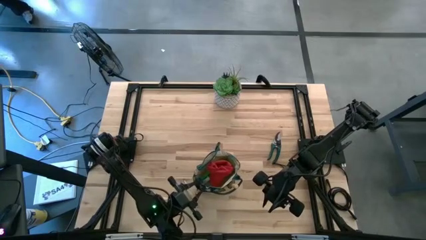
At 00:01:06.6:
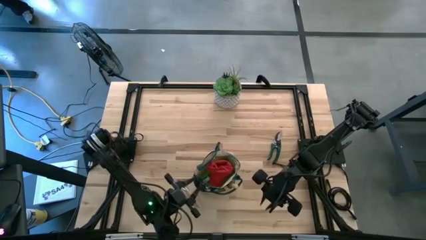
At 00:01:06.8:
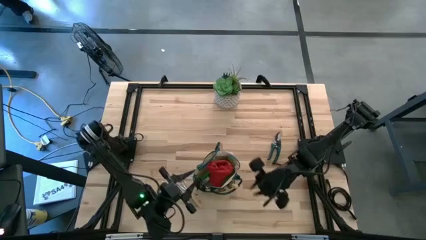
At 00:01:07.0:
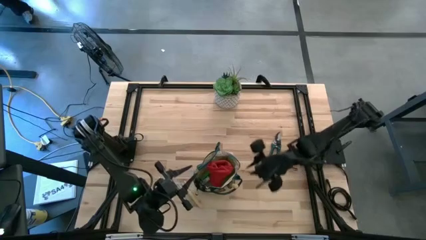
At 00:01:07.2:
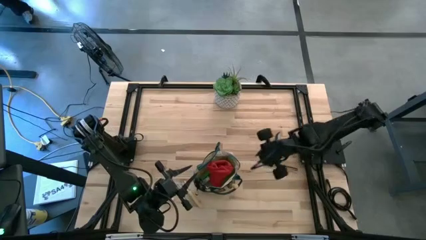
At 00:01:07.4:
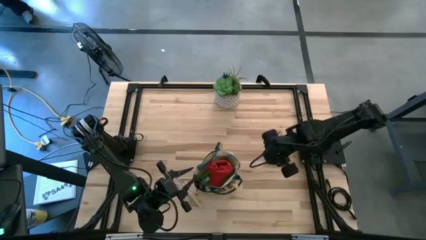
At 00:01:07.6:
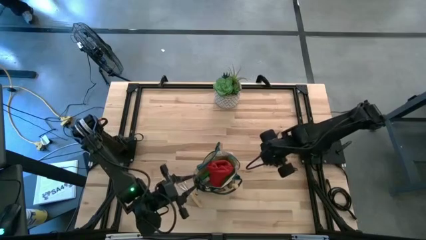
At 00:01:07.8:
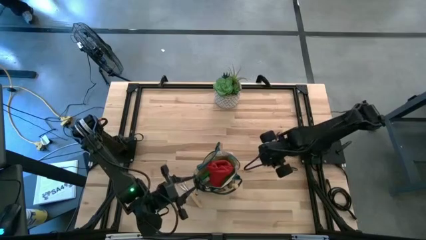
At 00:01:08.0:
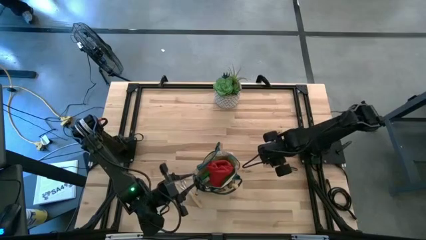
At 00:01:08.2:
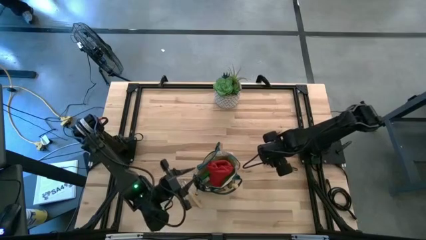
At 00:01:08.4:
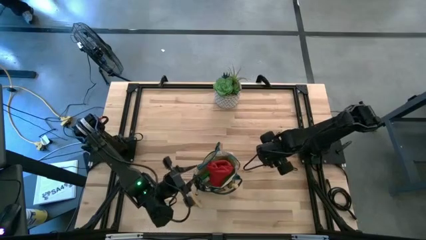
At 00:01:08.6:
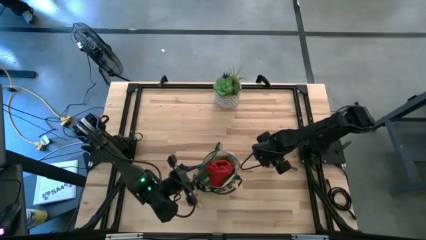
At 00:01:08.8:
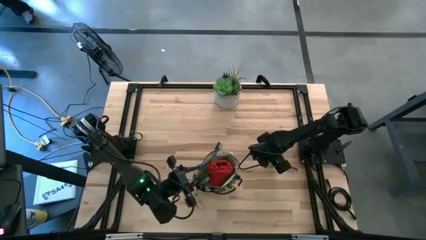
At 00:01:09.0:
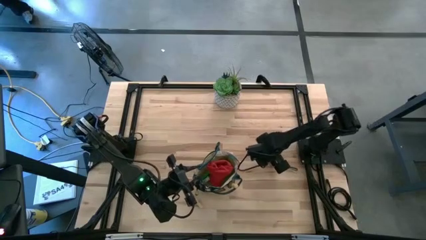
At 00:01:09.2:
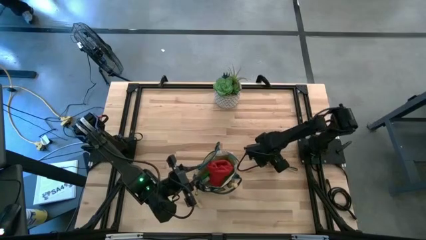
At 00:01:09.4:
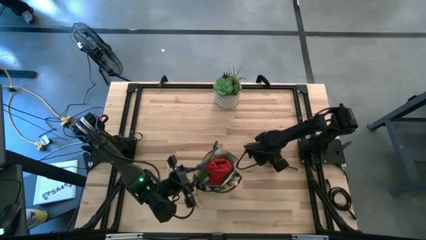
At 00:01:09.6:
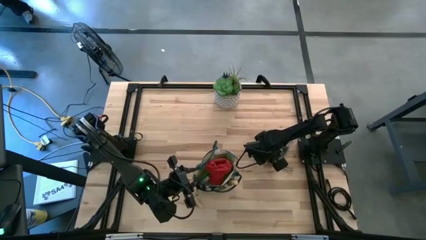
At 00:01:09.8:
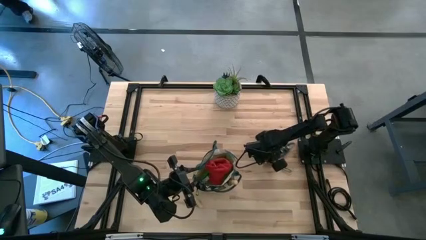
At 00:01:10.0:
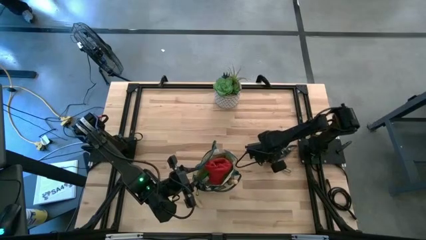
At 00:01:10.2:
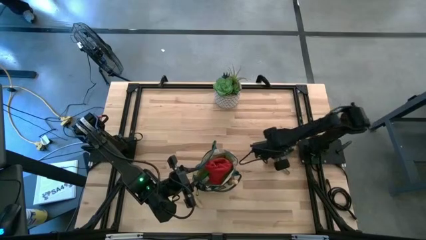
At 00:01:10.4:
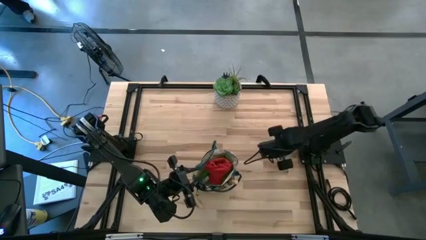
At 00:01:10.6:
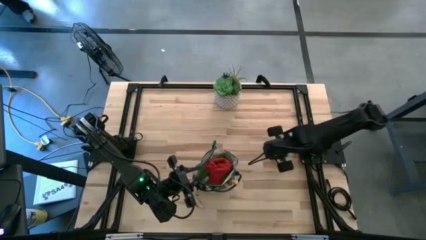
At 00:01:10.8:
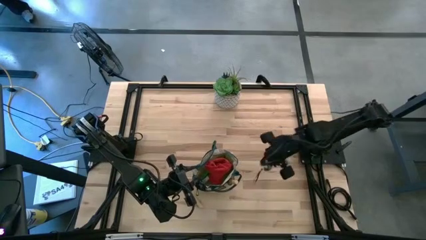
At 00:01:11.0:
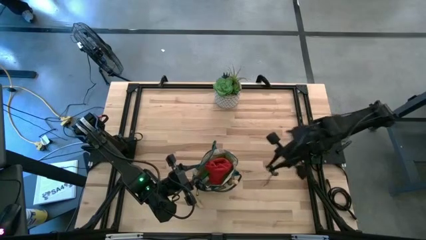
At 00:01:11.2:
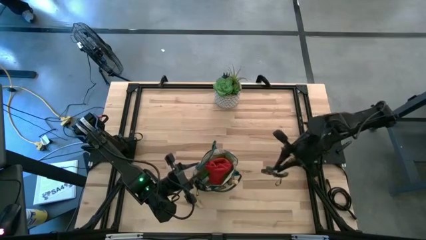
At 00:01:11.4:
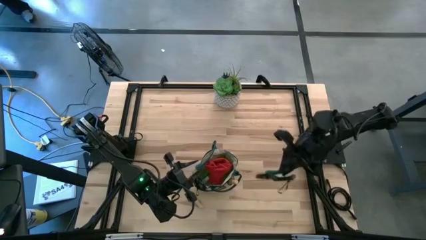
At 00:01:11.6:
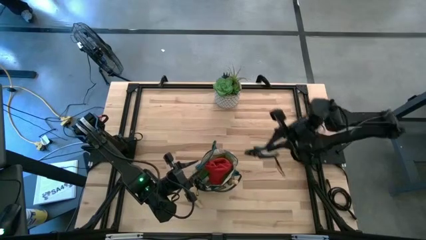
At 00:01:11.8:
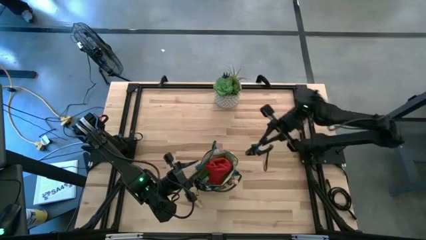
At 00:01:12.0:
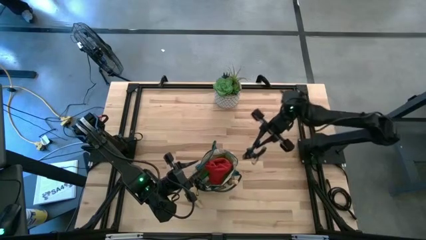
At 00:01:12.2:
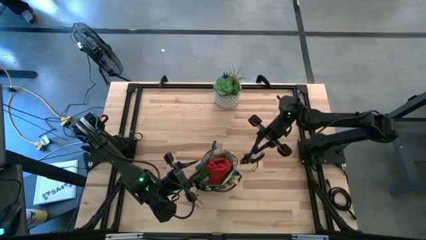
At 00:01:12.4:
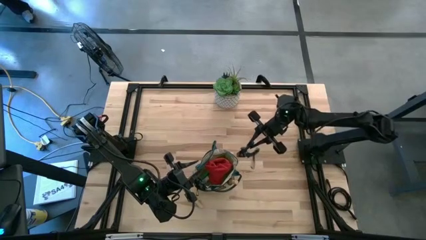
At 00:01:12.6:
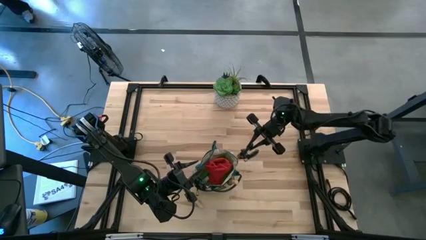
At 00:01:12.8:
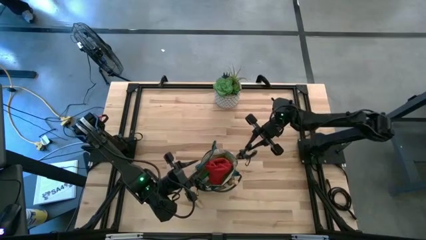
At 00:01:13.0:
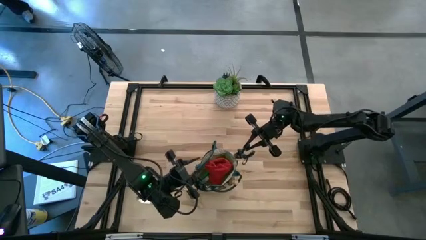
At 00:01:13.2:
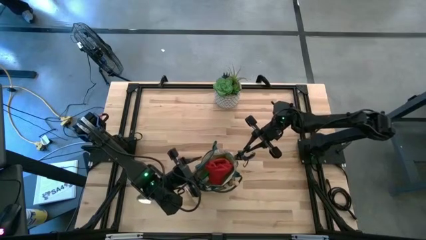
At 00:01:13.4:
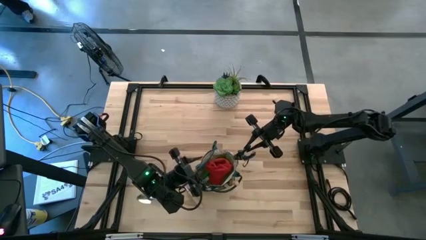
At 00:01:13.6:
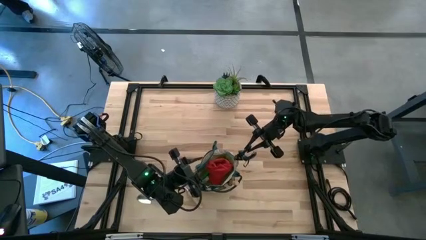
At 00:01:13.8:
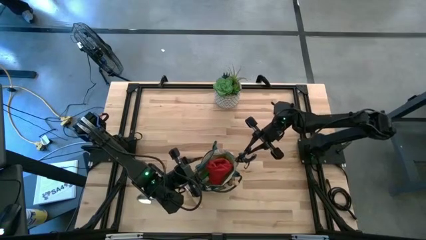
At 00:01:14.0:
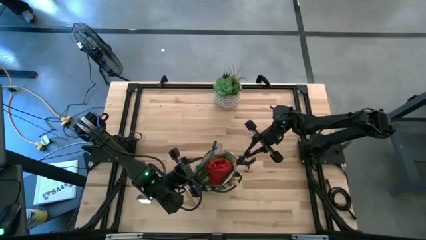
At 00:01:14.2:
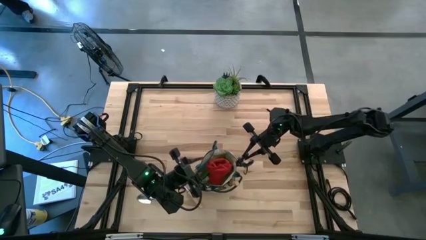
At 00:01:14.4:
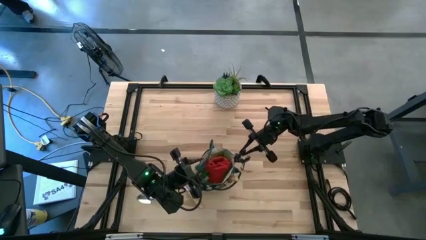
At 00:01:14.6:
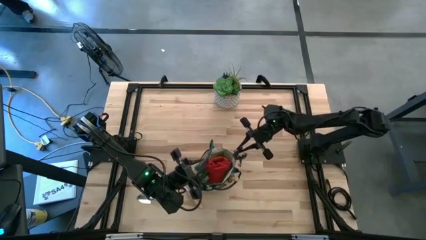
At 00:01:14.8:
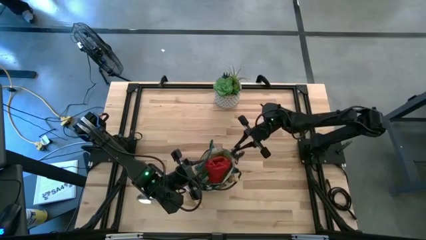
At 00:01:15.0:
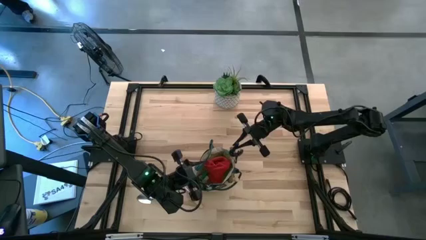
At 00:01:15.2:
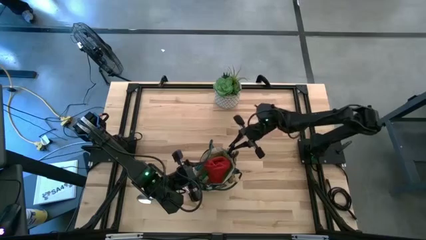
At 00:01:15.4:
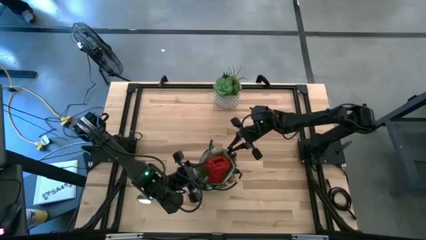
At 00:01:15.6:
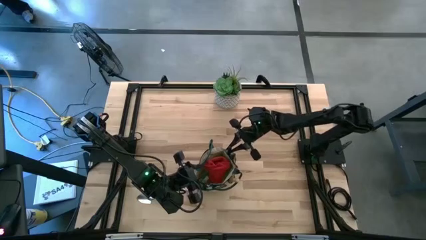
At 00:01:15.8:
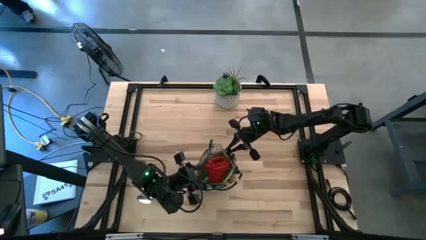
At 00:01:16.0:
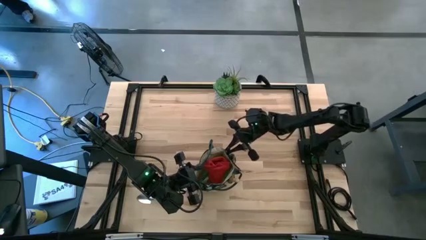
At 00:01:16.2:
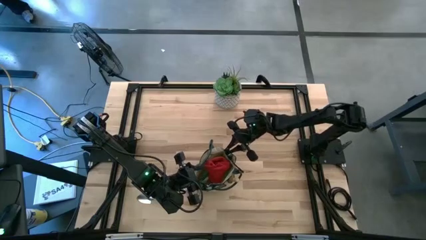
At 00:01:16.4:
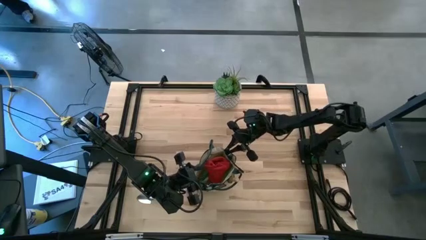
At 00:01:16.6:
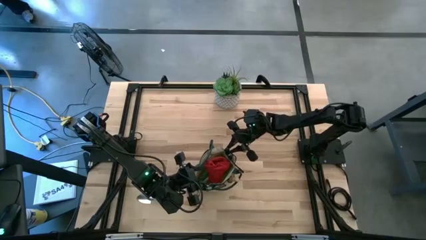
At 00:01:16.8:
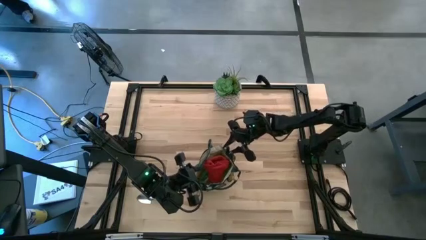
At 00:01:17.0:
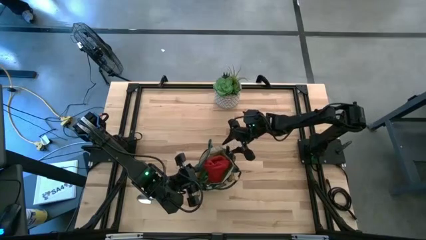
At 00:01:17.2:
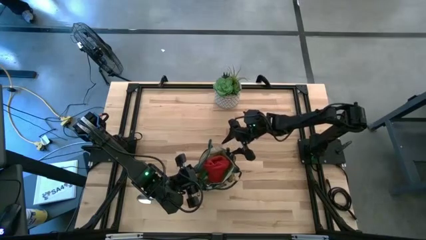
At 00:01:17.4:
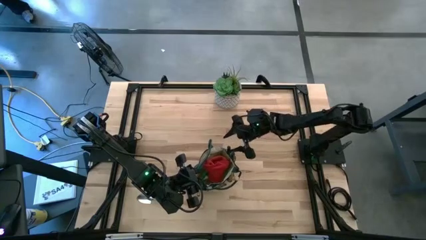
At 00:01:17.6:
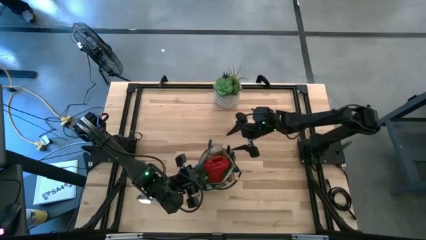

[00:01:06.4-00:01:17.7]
Task: Pick & Place Garden tools in Gardening bag
Put the green shear scissors into the white gardening bag
